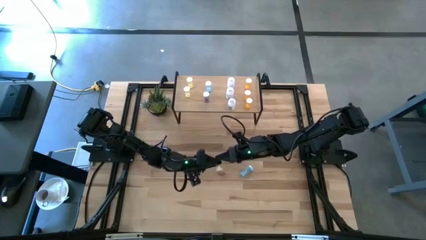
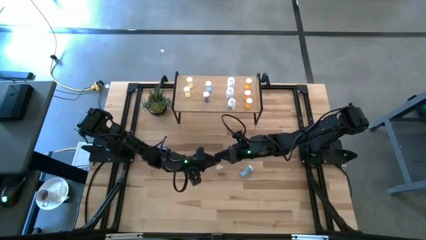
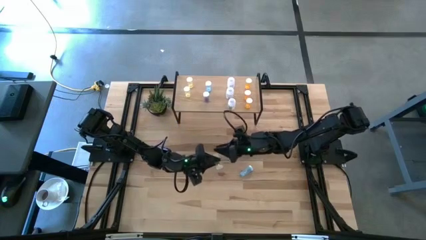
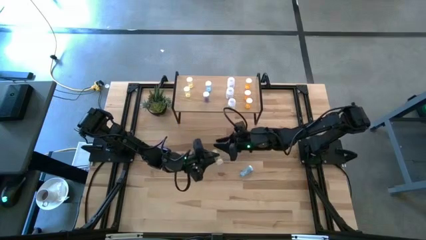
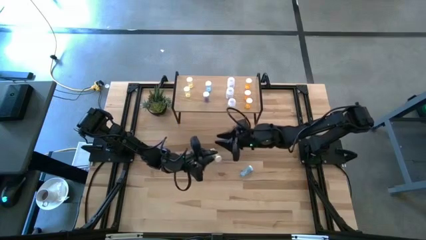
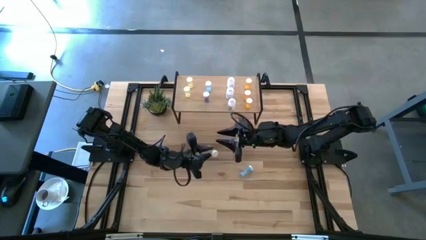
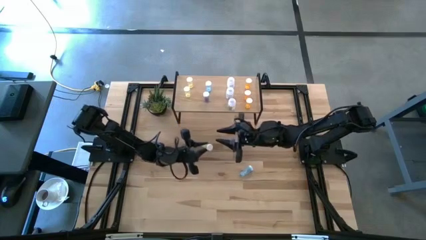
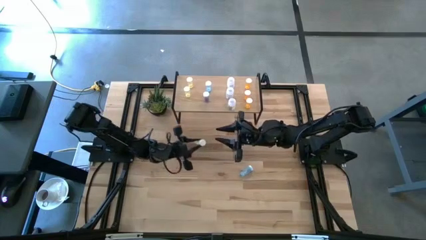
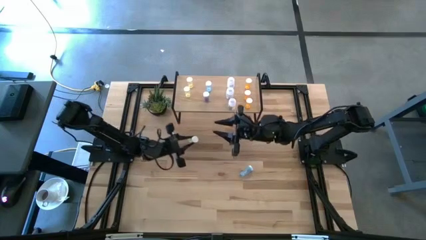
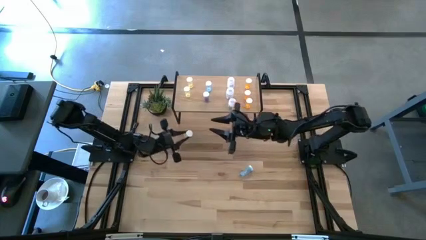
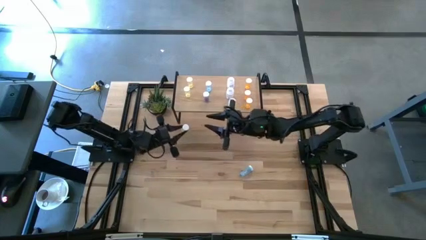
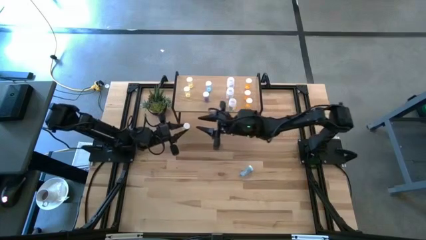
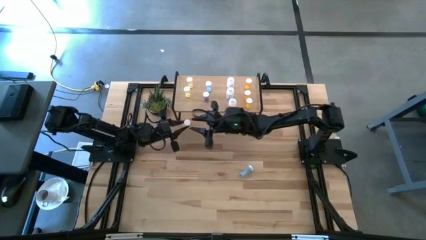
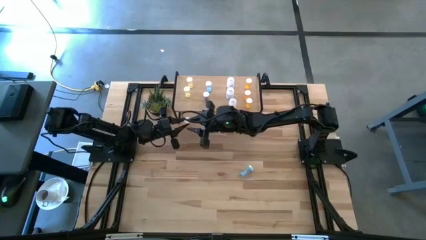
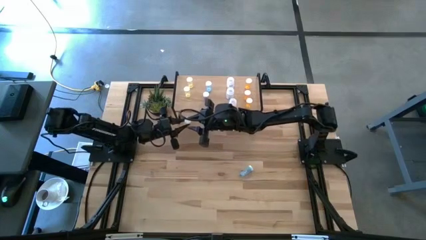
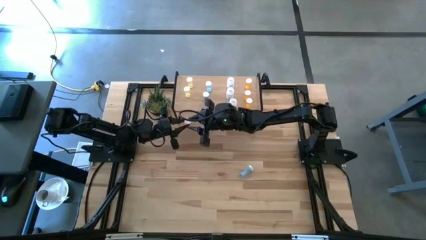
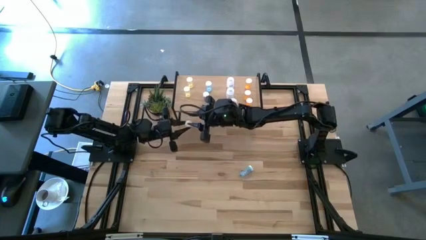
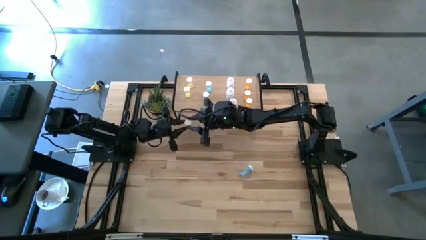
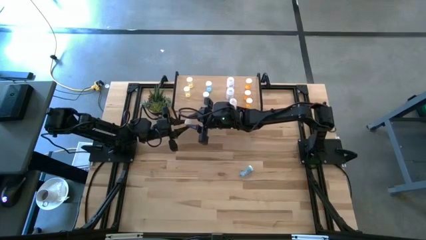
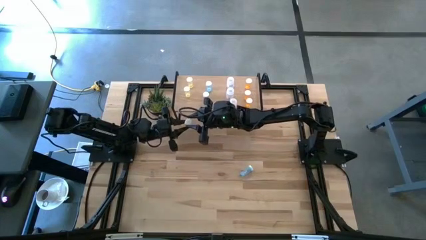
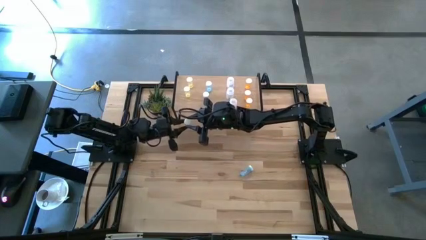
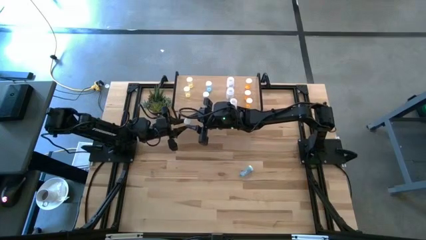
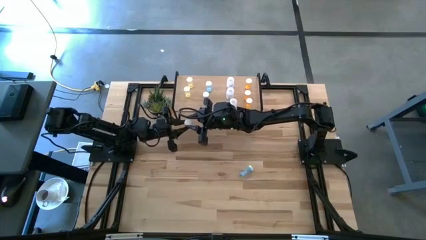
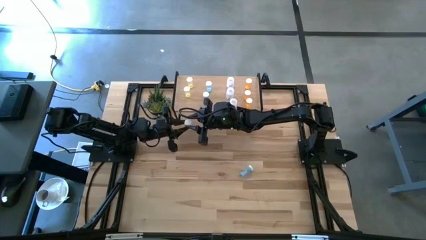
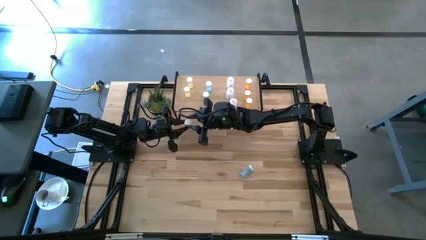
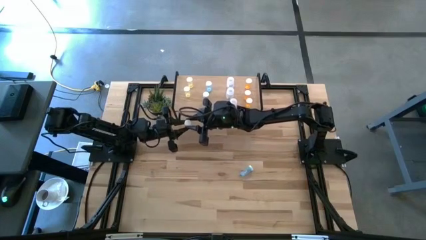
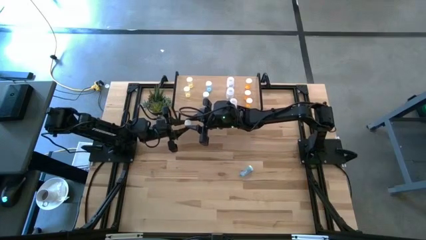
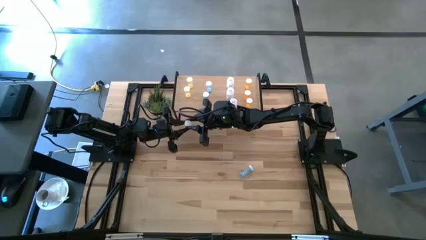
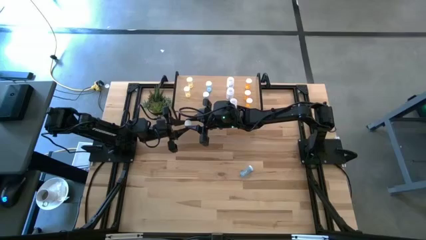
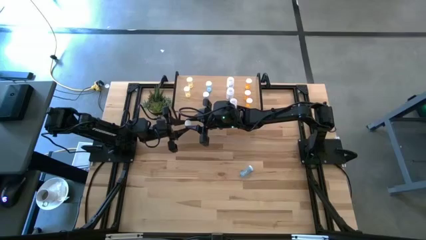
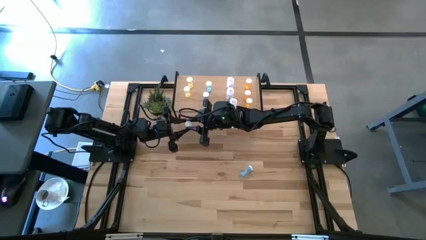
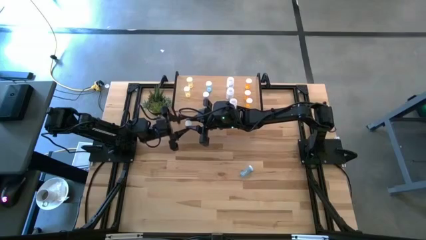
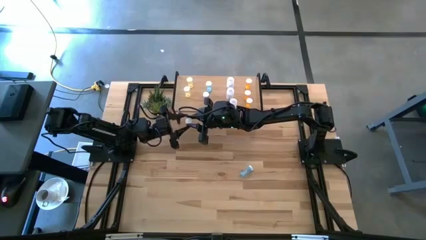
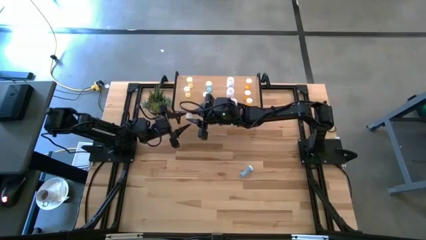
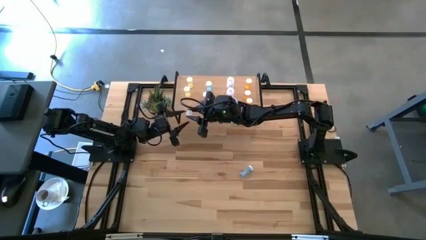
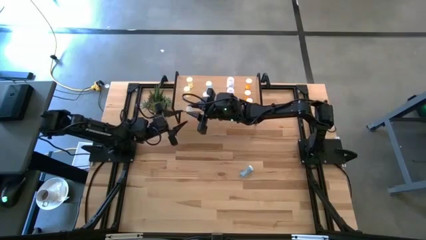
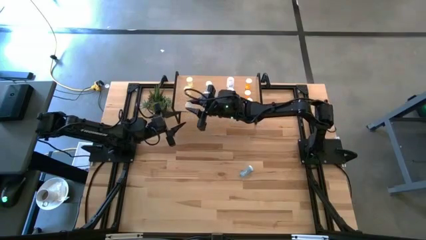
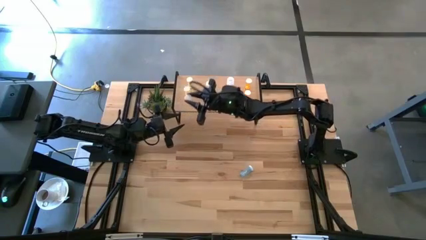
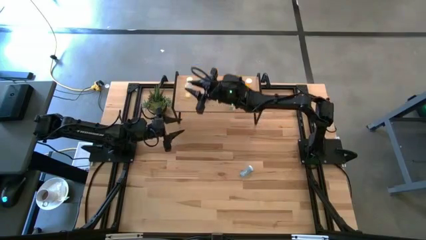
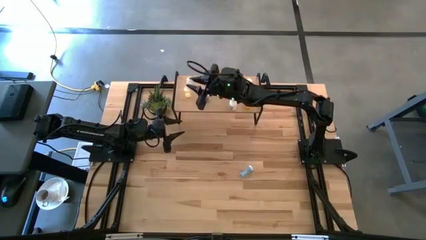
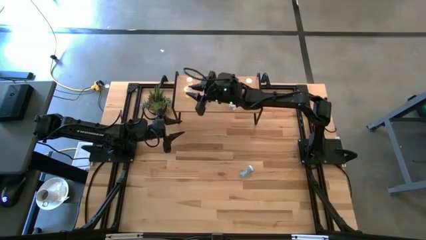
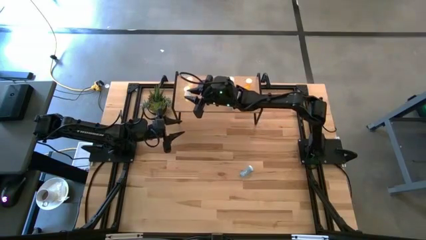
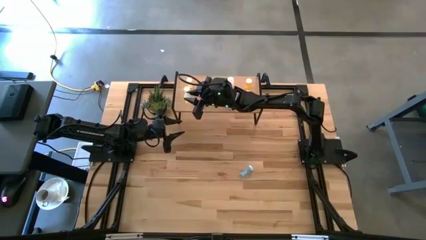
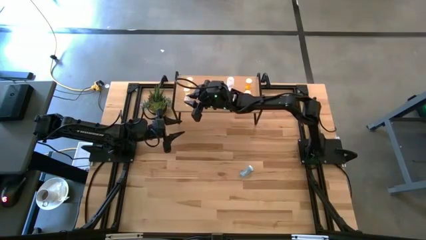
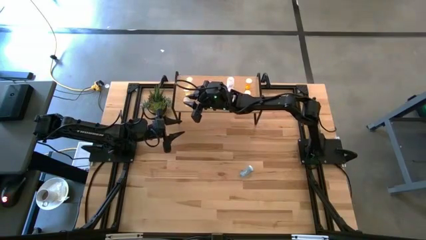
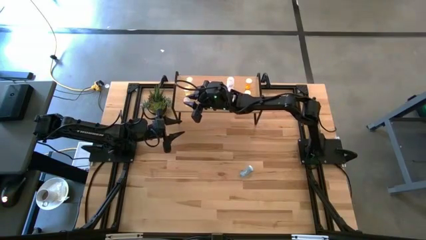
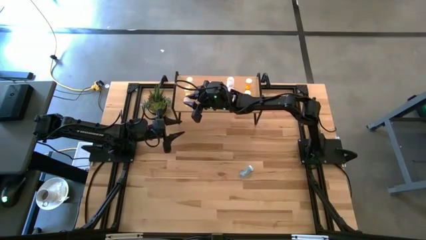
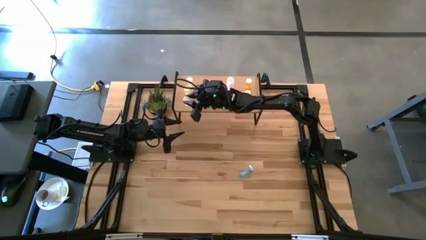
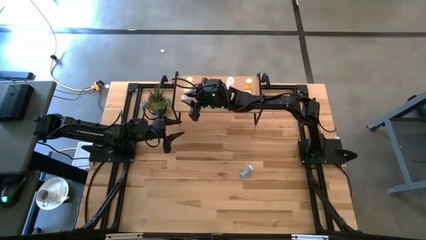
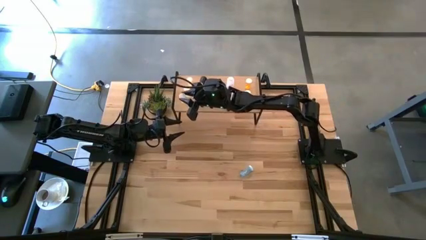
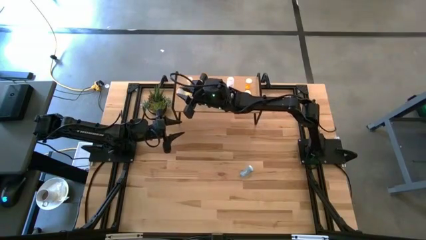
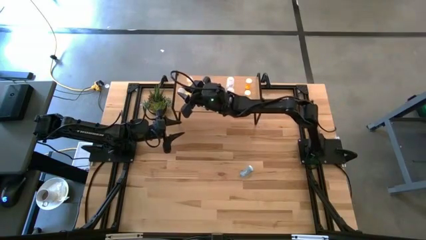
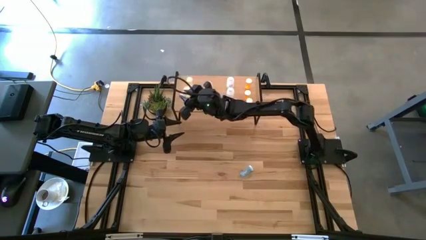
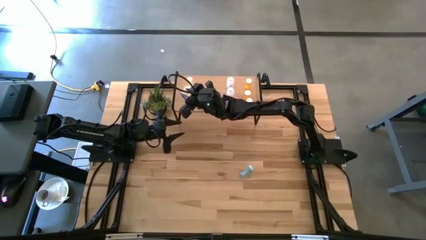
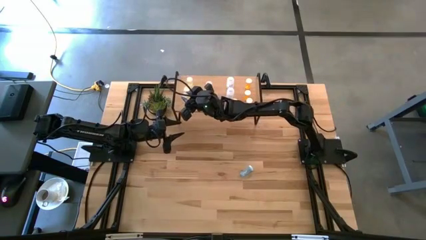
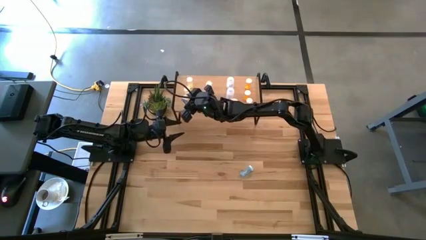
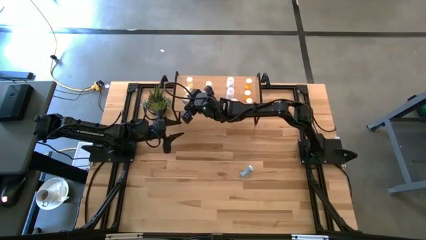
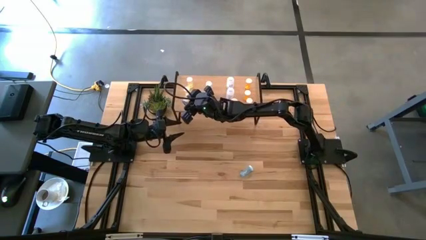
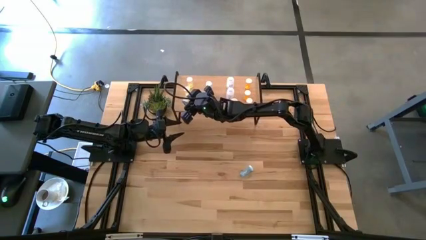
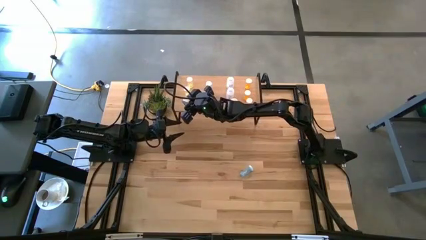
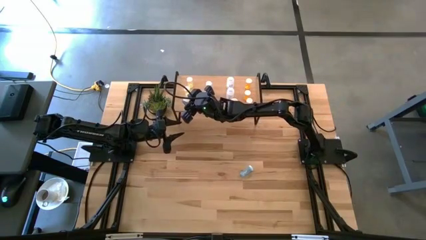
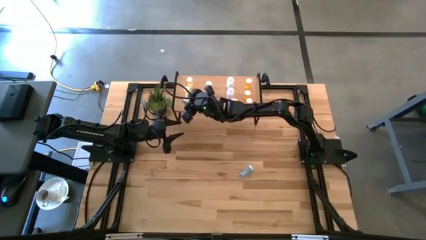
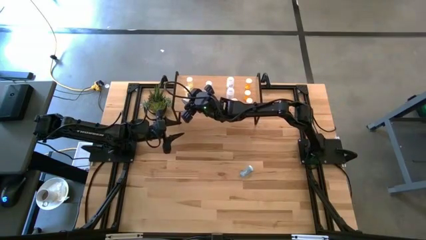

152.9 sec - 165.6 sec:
Task: Pick and place medicine bottles onto shelf by color
Put the yellow pill bottle on the shelf

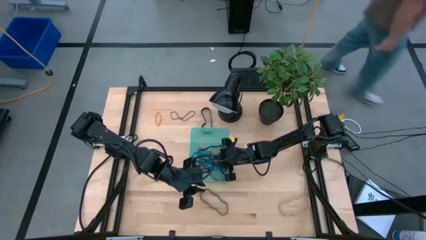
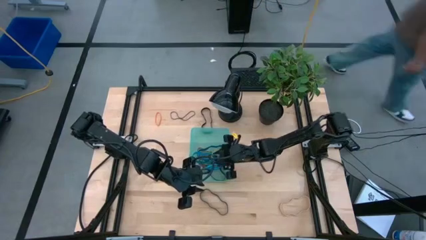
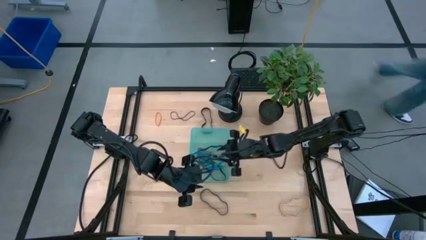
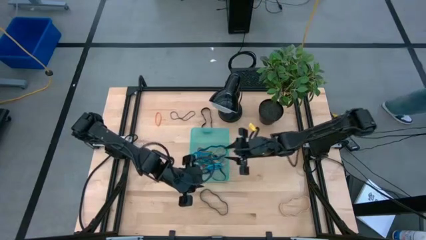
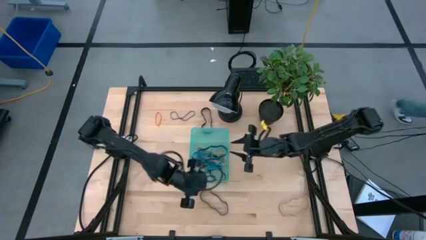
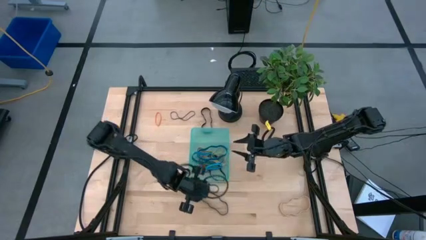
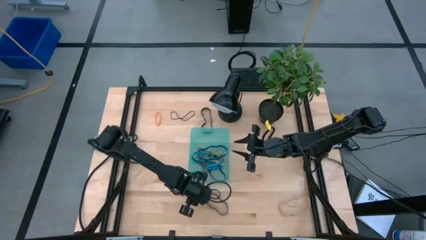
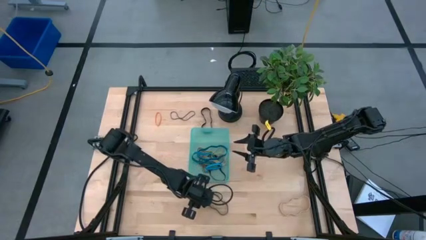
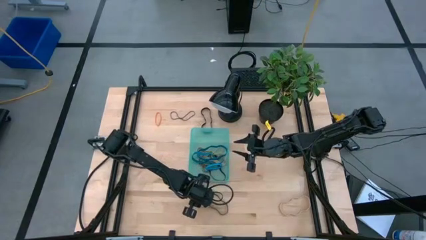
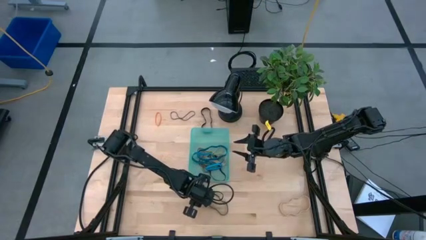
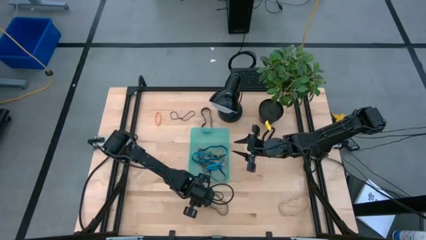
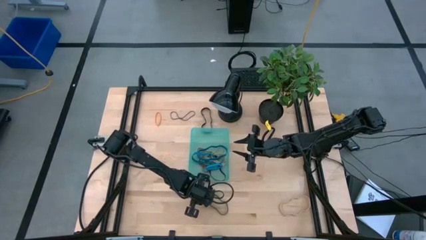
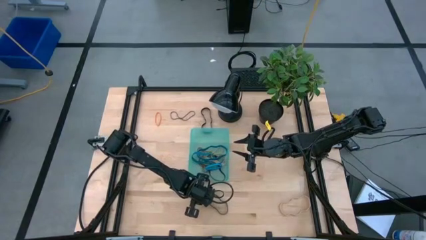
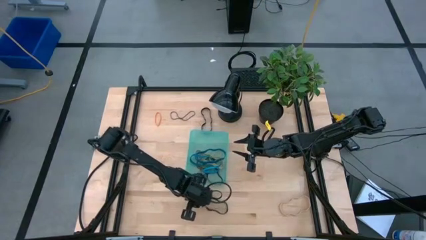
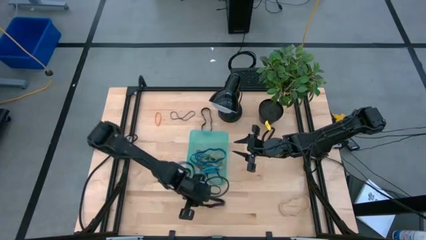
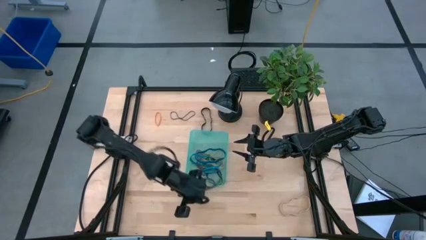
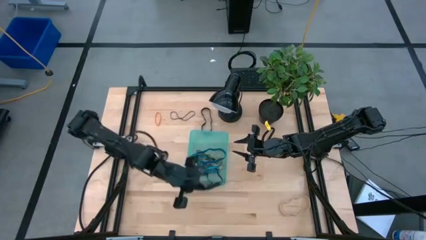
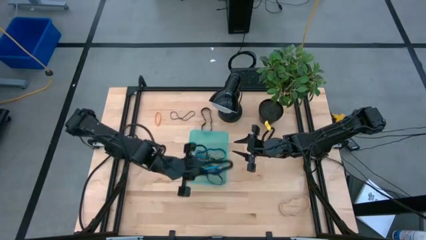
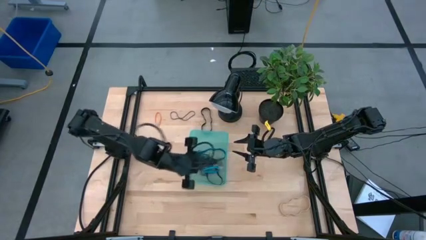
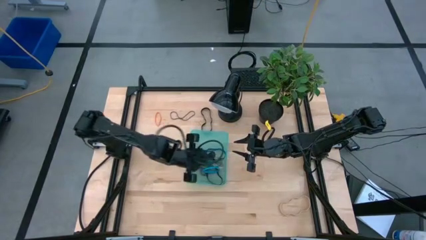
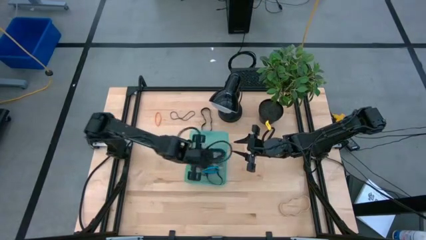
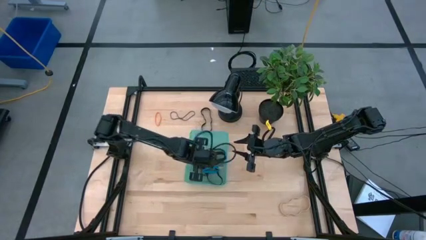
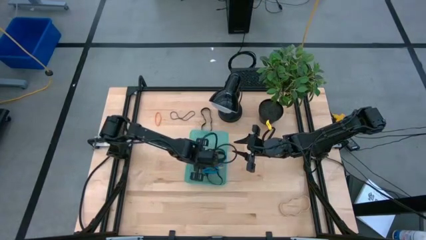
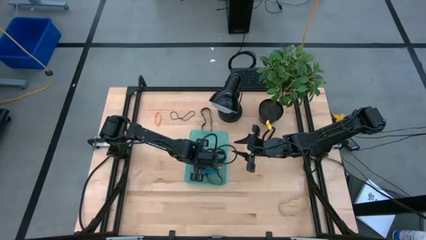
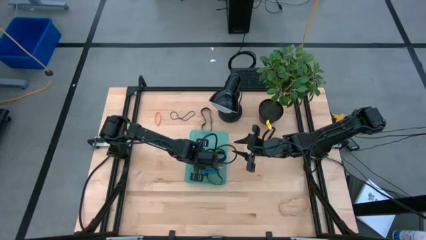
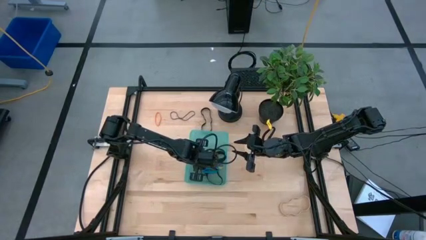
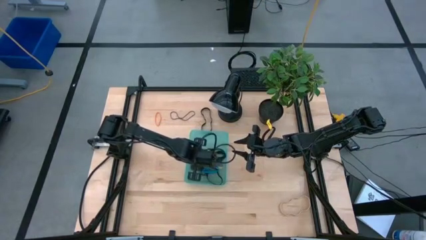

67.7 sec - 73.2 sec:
Task: Pick and place rubber bands into bin
Put the bottom black rubber band into the basket
